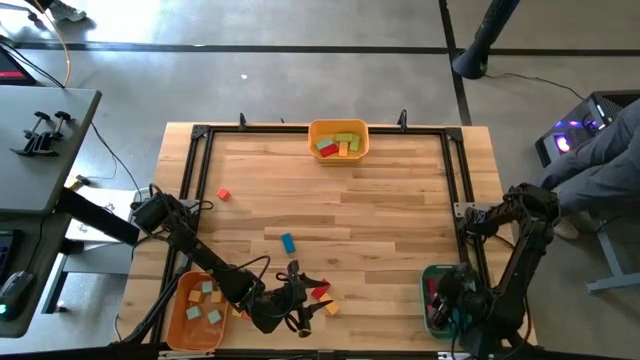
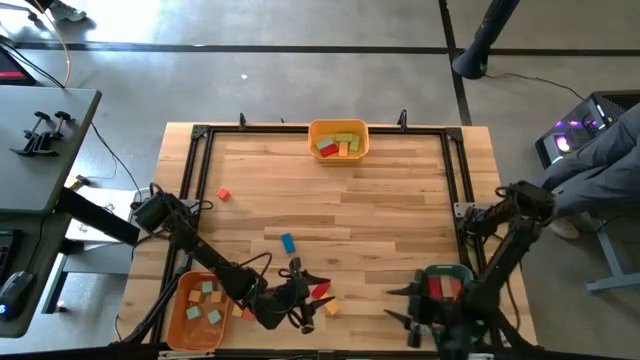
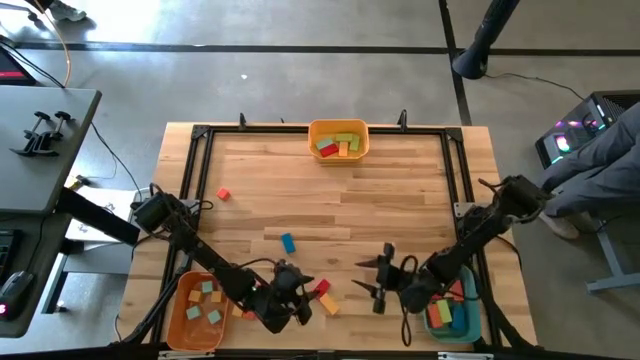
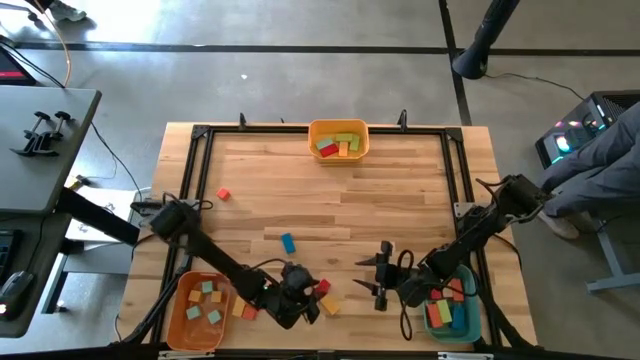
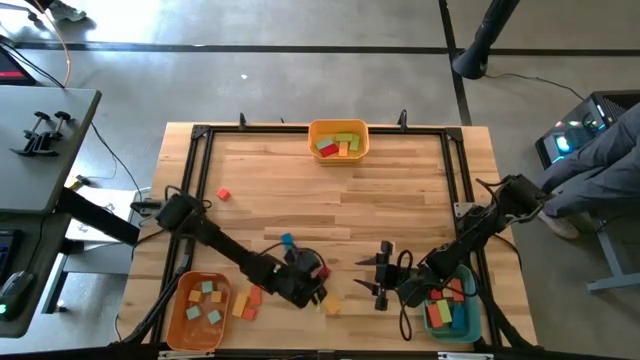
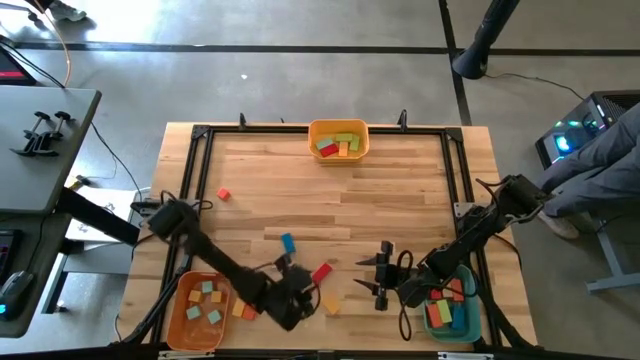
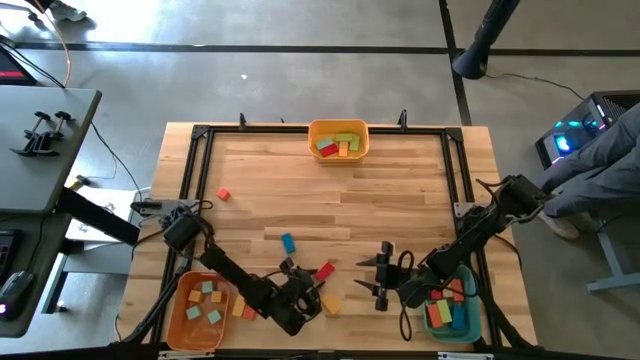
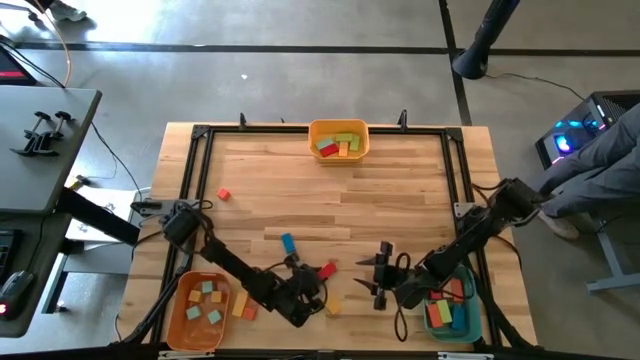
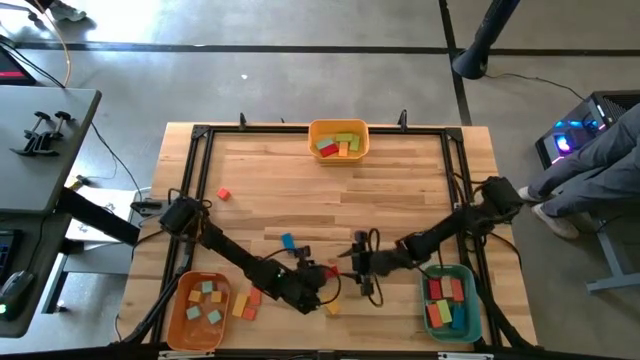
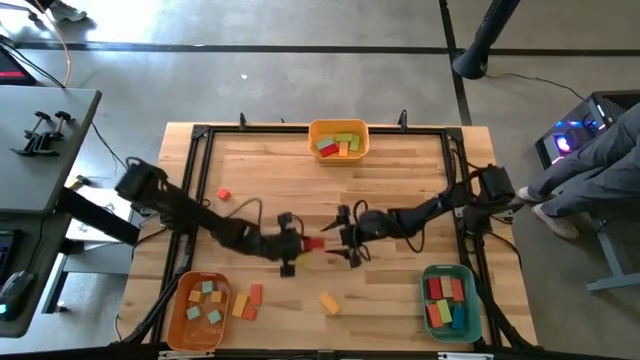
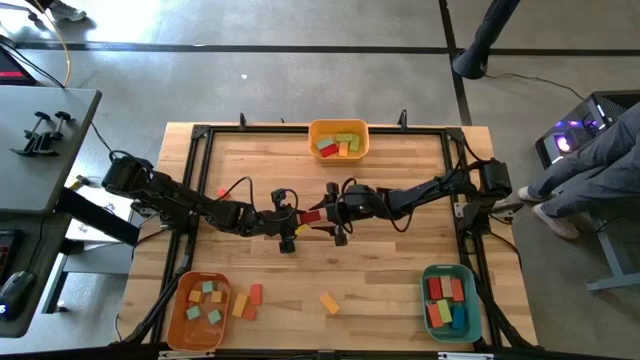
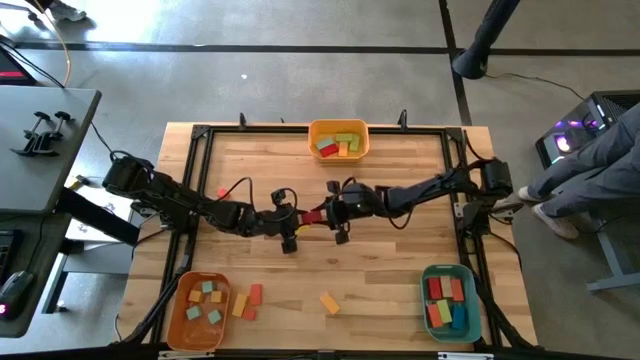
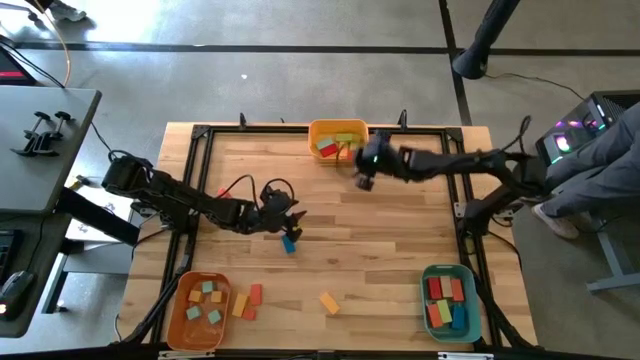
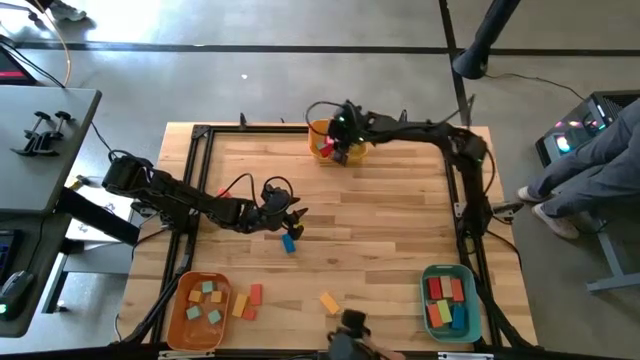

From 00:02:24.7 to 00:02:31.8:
Task: Sort blocks by size
Put the small red rectangle block into the yellow bin

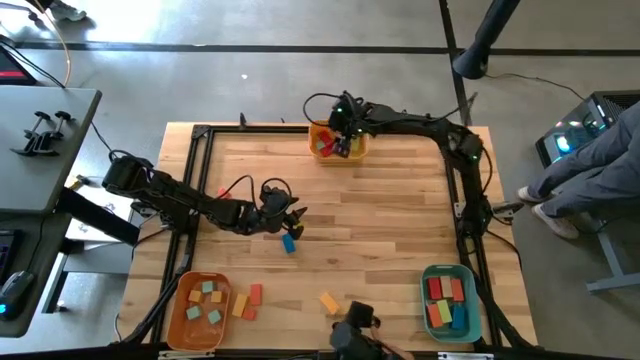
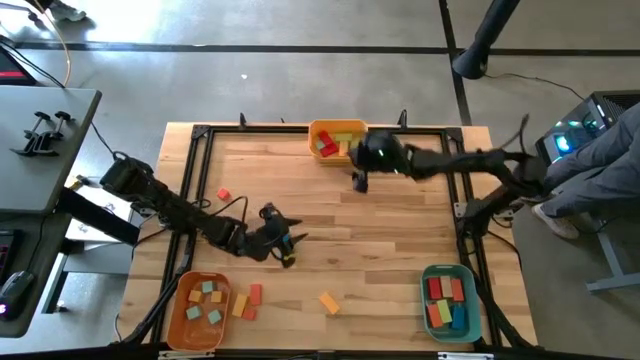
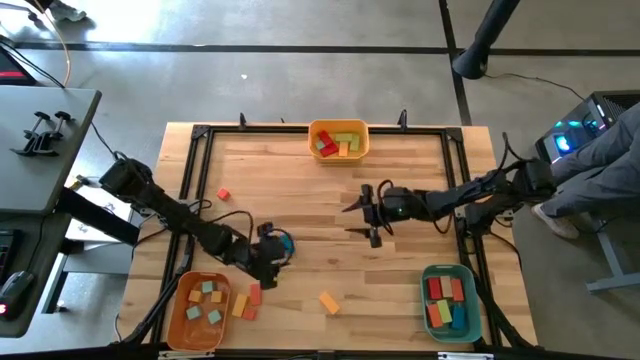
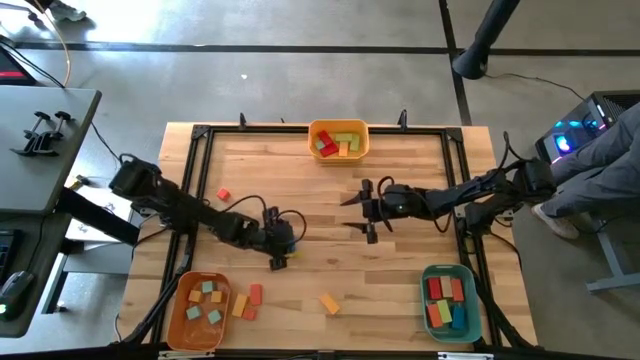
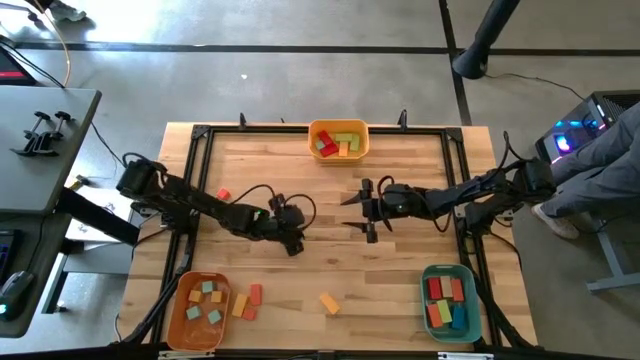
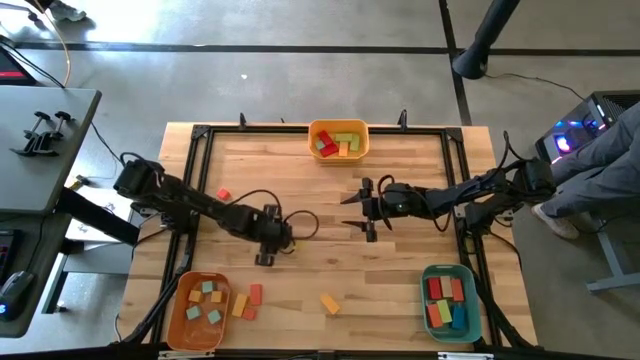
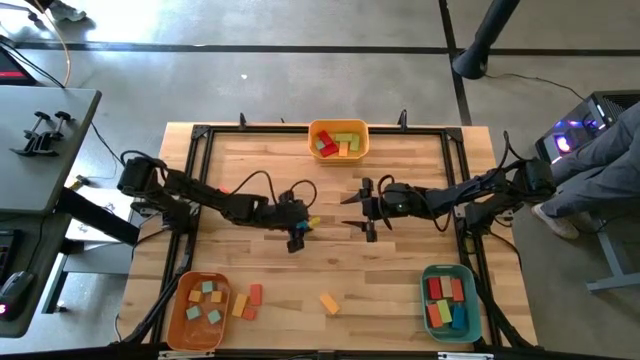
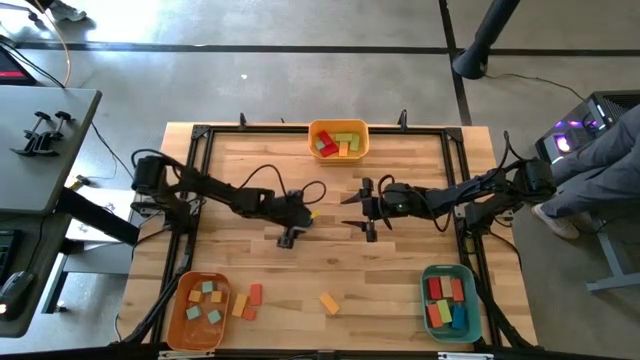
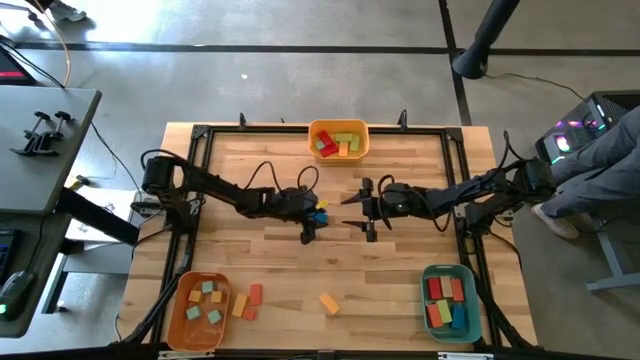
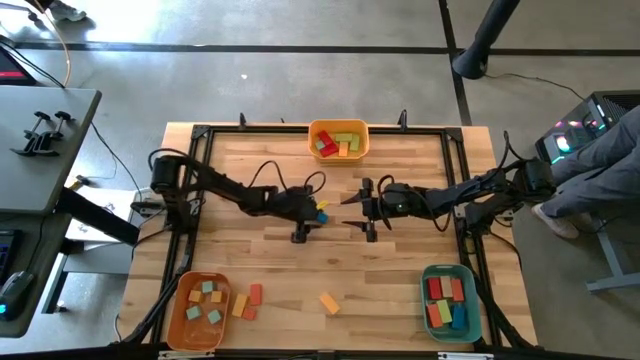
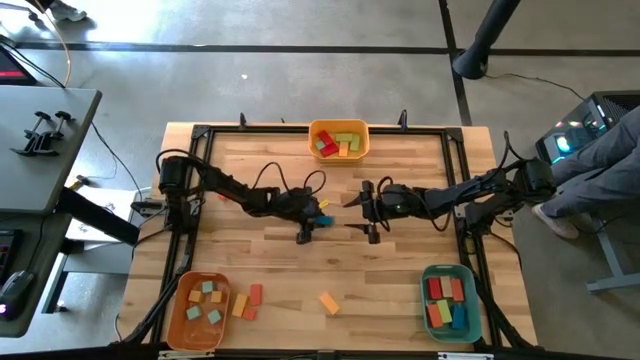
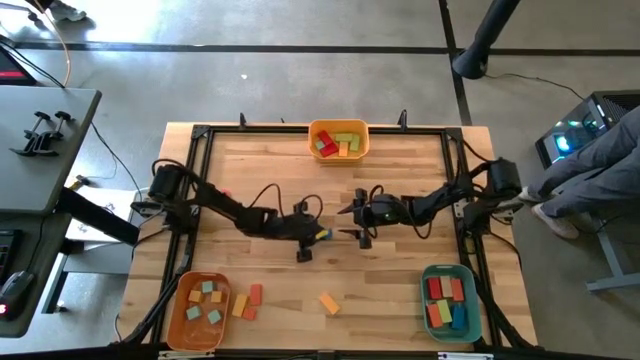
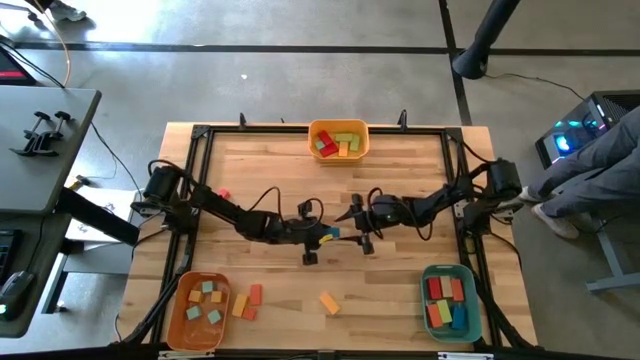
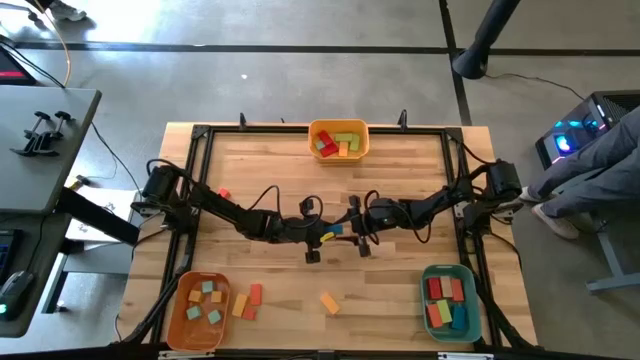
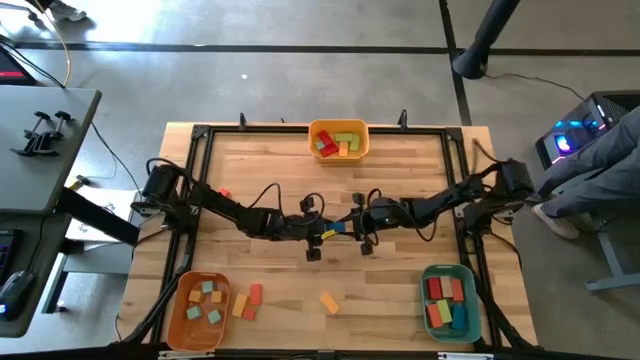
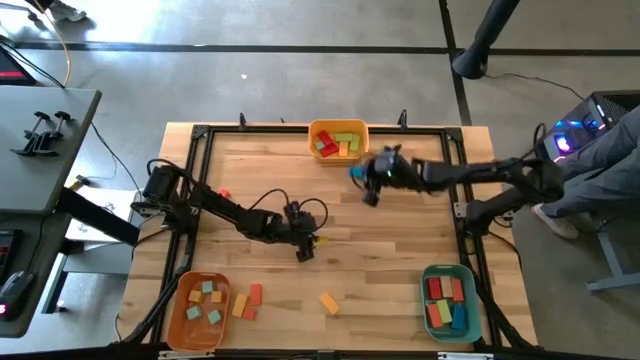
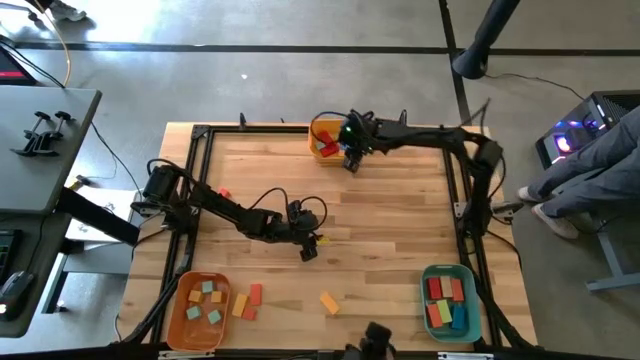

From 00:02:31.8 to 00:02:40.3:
Put the small blue rectangle block into the yellow bin

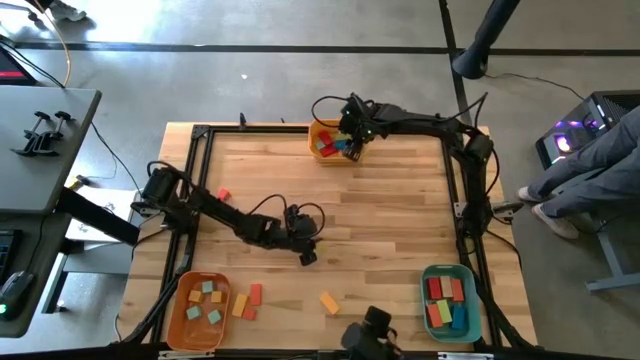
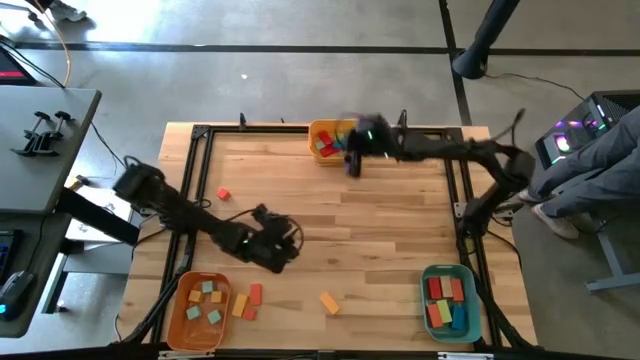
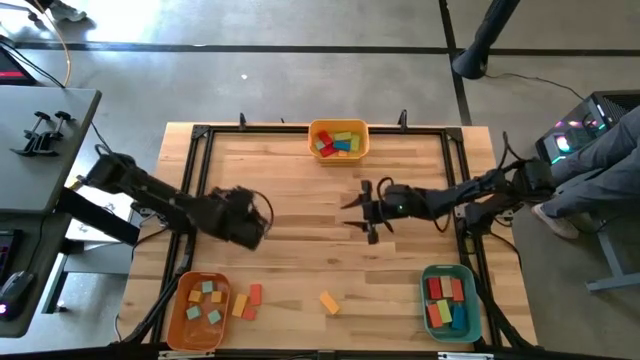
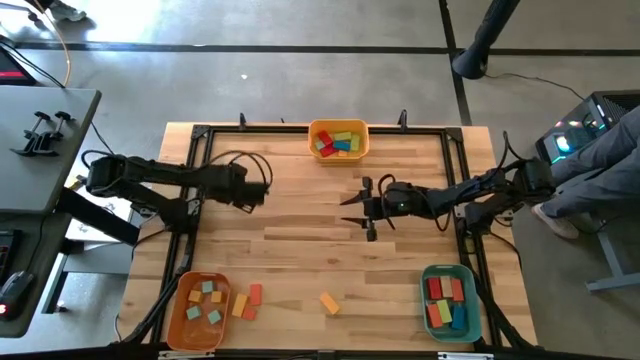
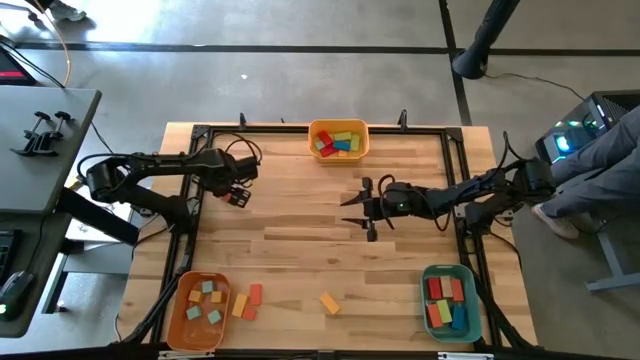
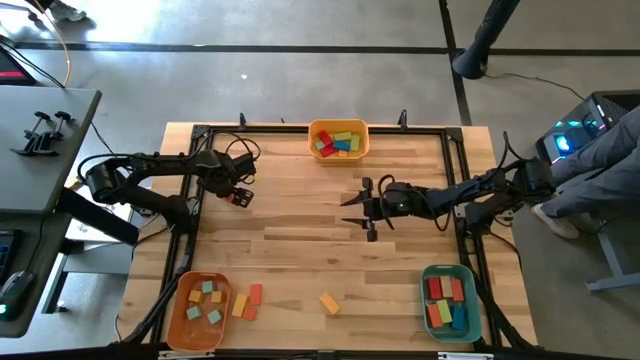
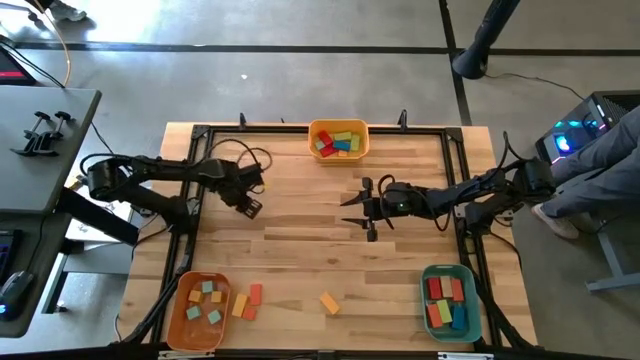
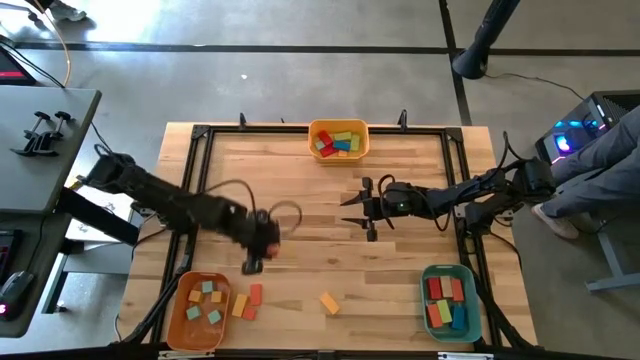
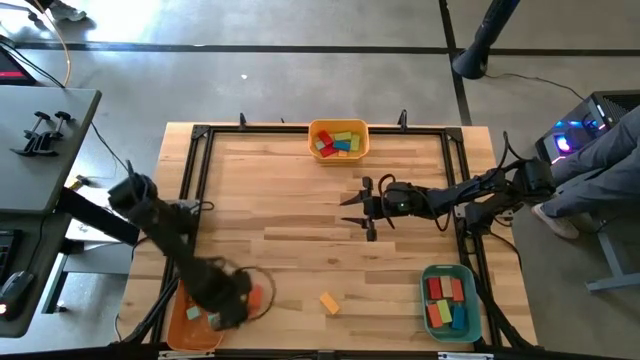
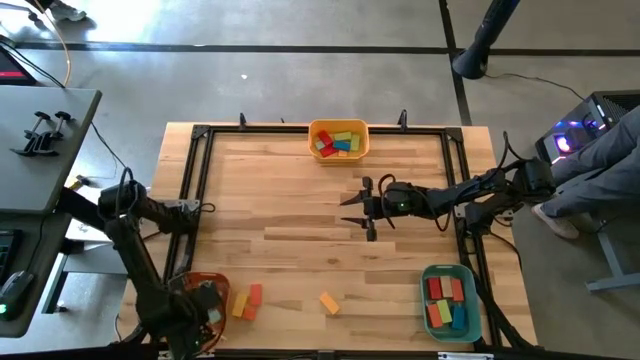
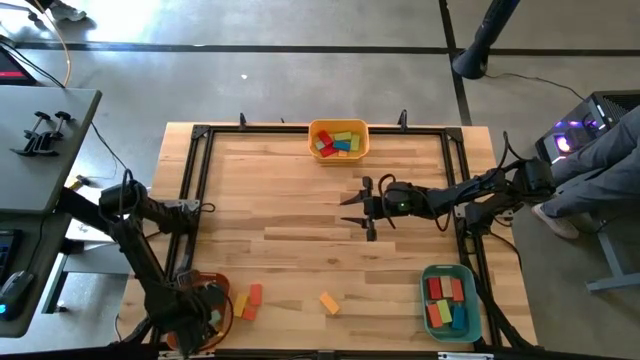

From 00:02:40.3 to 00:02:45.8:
Put the orange square block into the orange bin

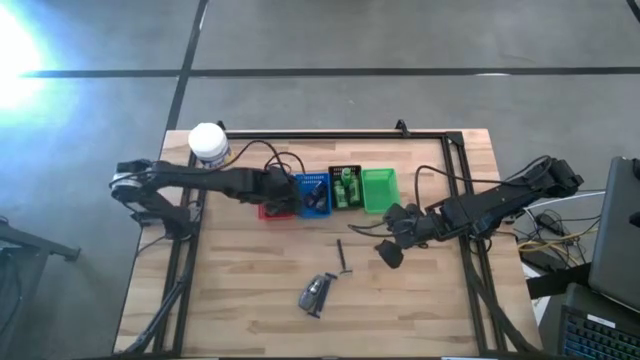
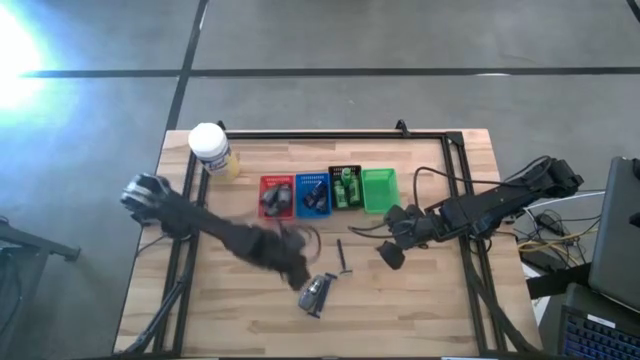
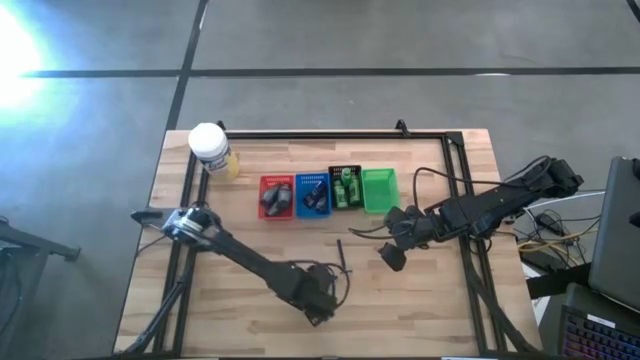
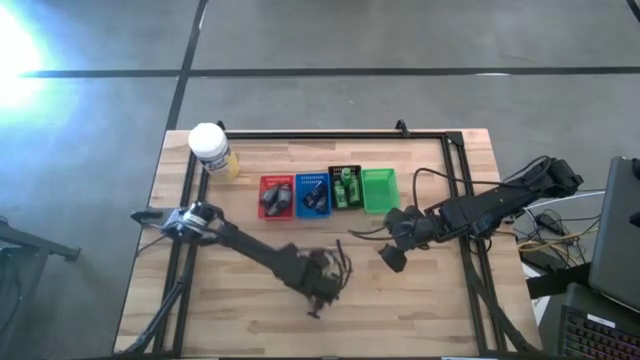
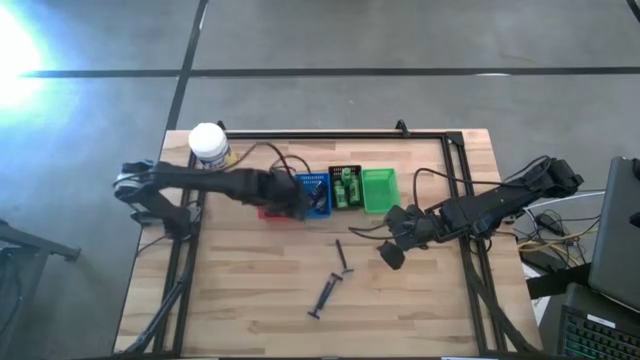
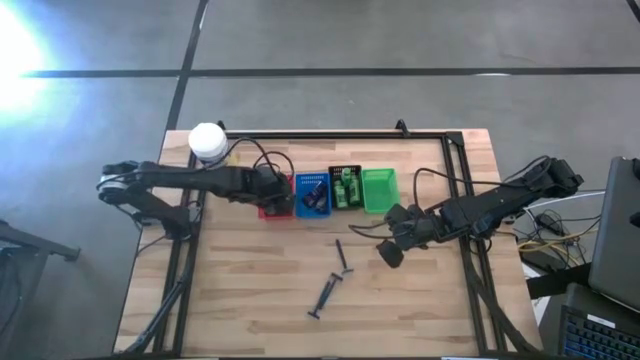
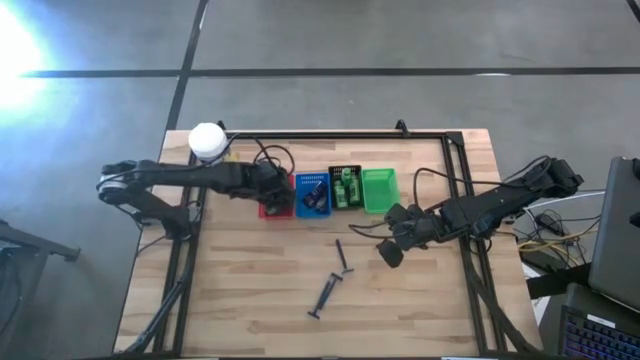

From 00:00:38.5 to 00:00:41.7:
Task: Pick & Place Travel size toiletries
Put the gray deodorant into the red bin
